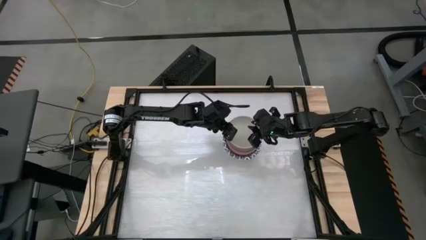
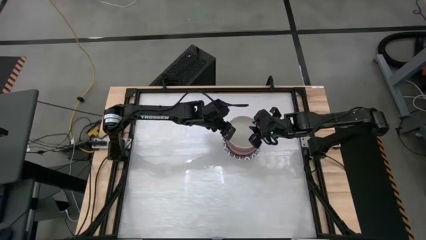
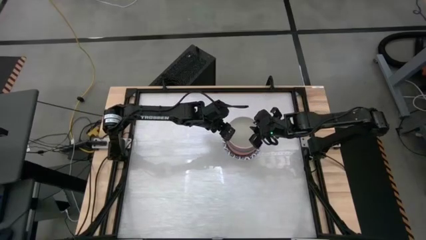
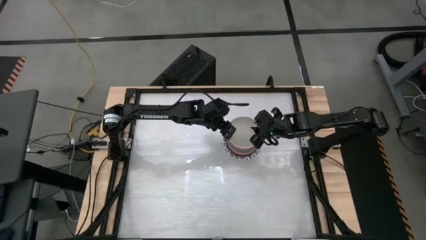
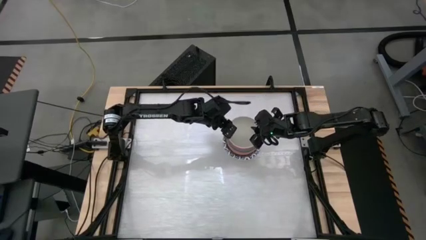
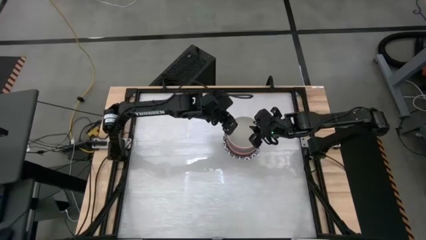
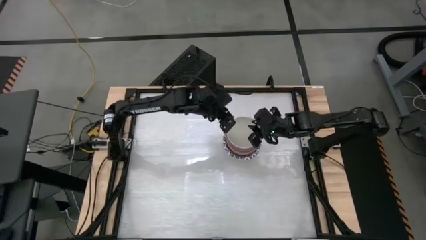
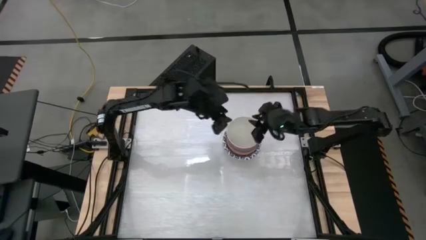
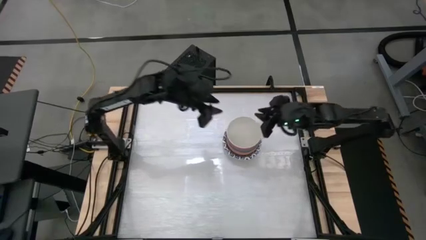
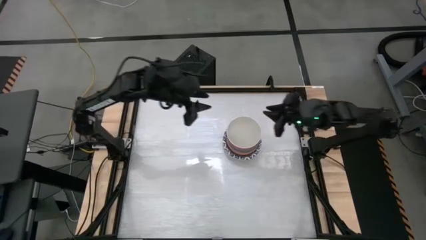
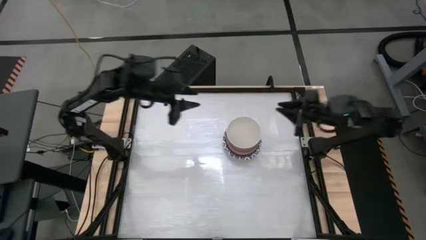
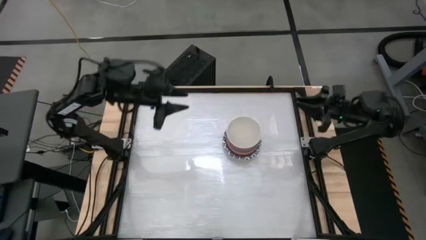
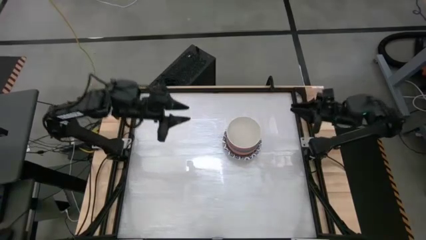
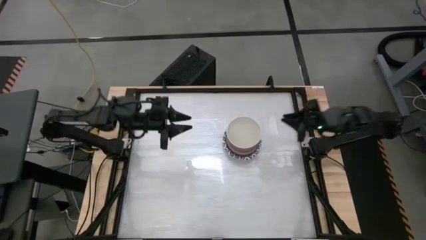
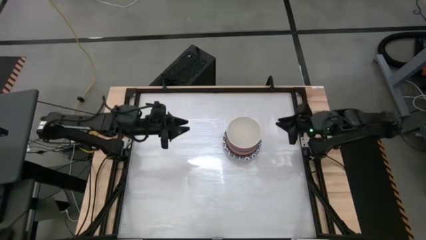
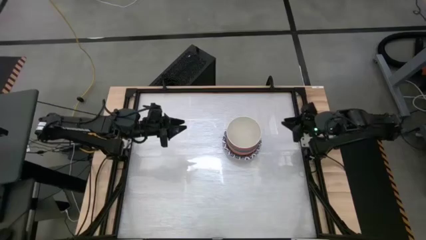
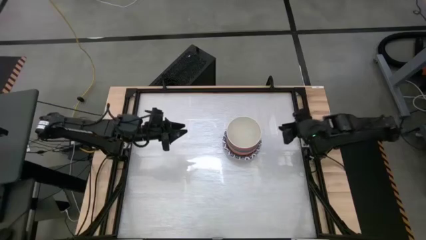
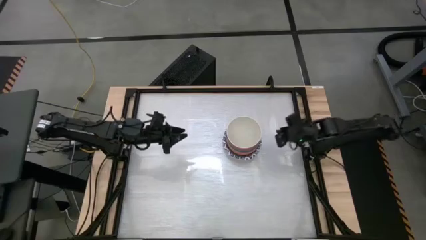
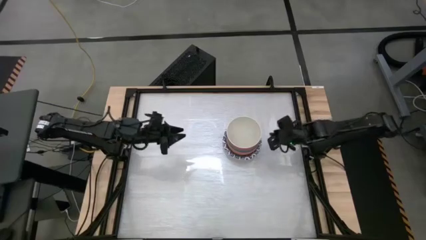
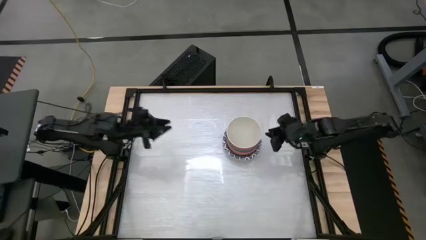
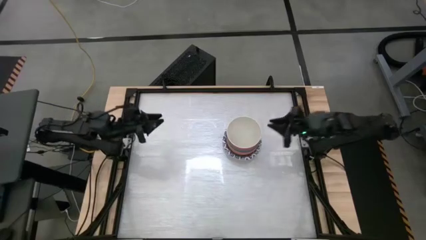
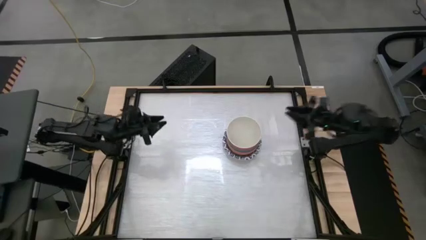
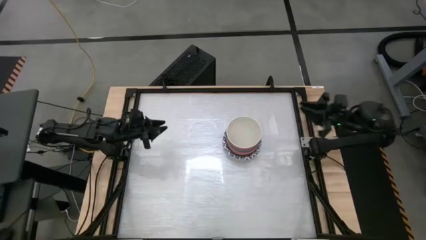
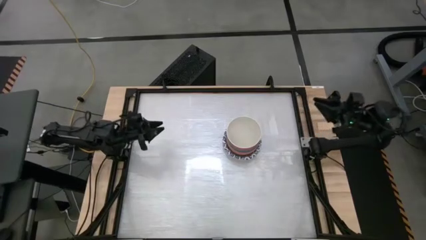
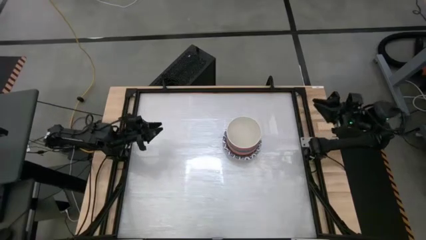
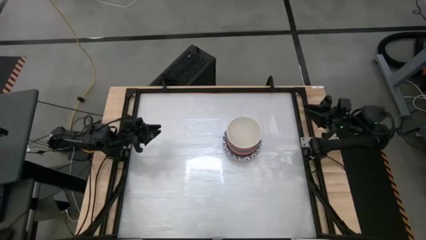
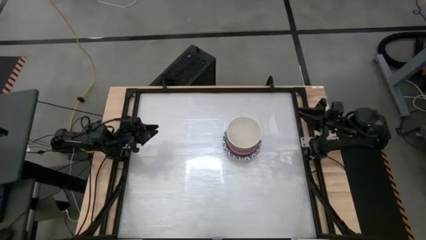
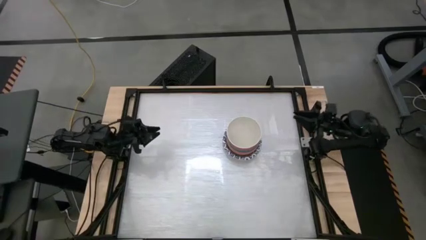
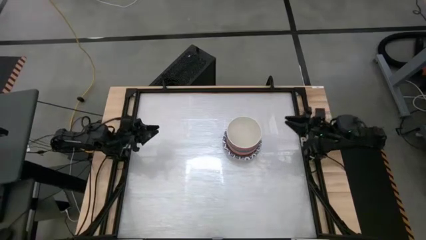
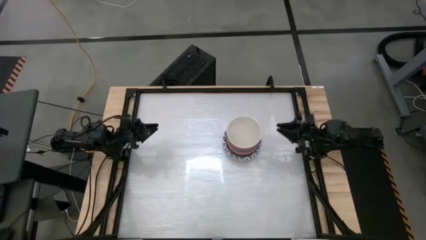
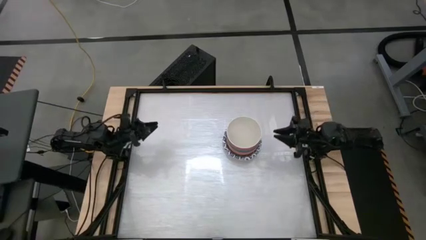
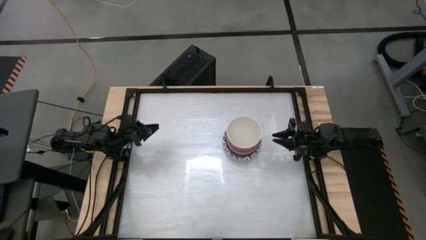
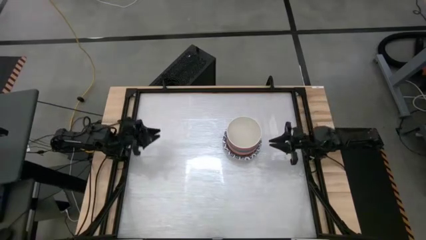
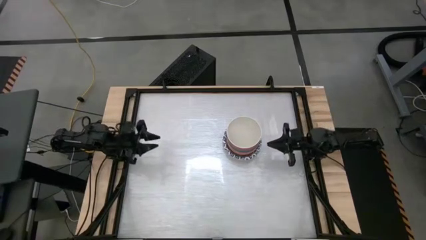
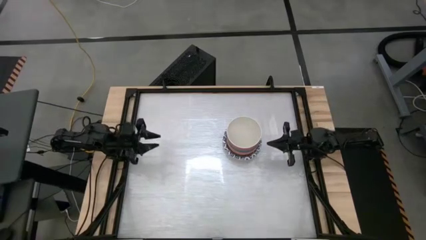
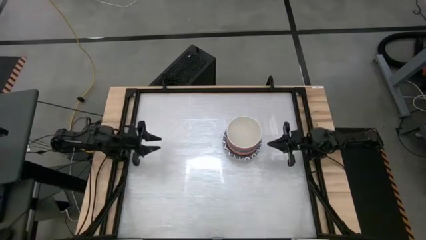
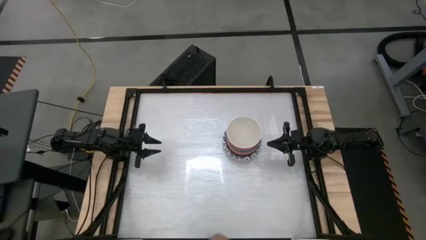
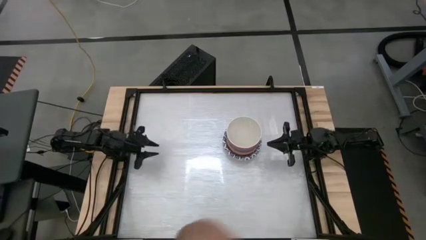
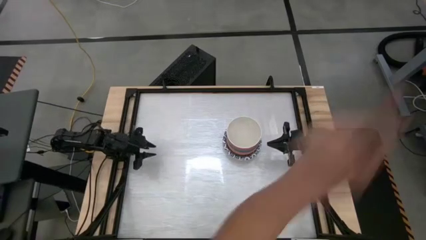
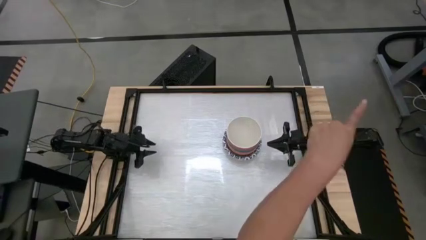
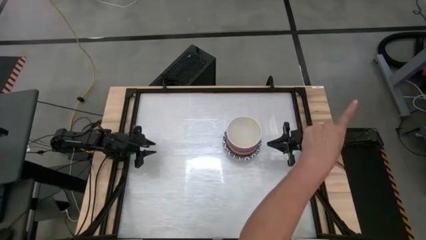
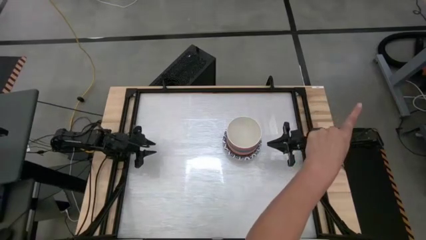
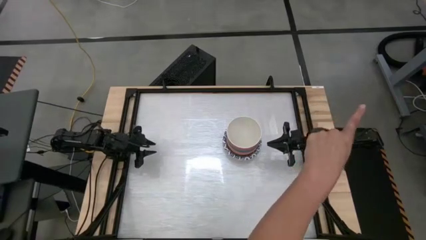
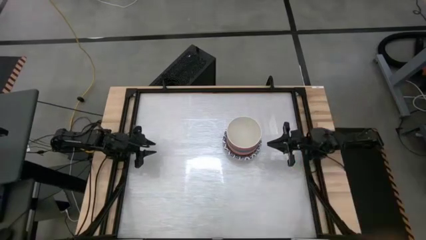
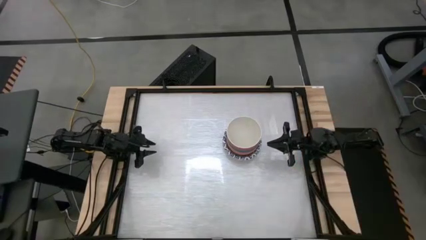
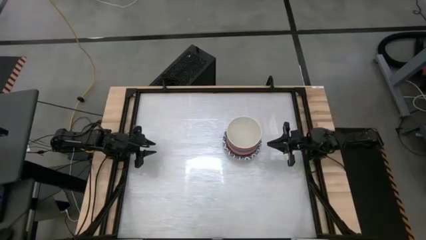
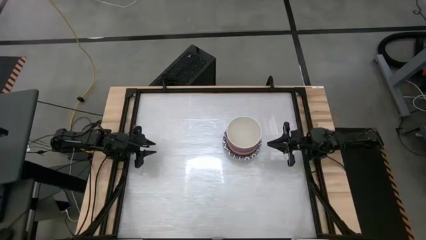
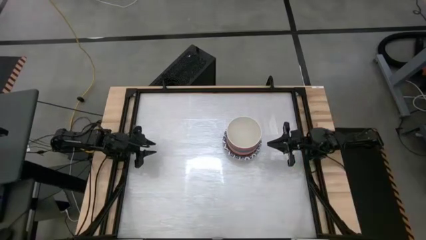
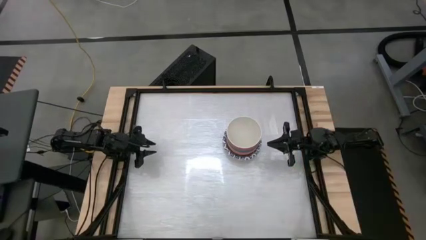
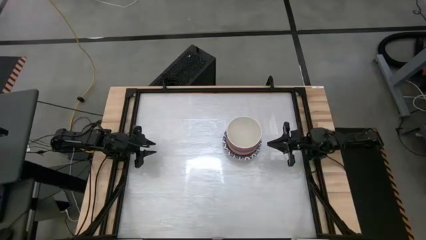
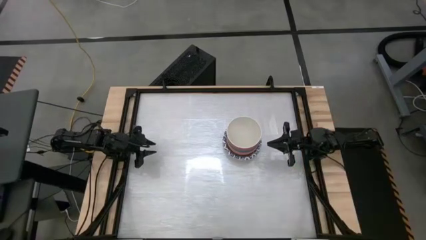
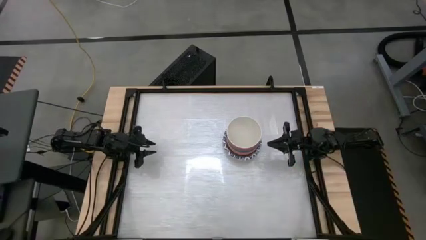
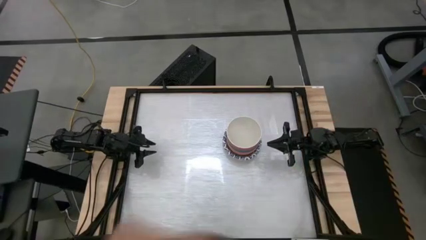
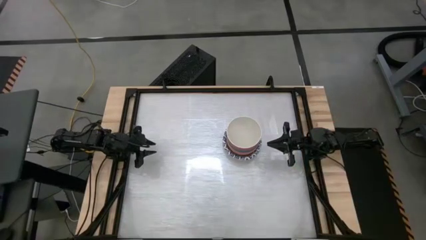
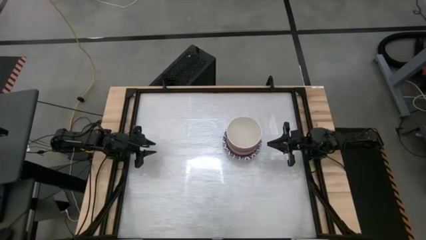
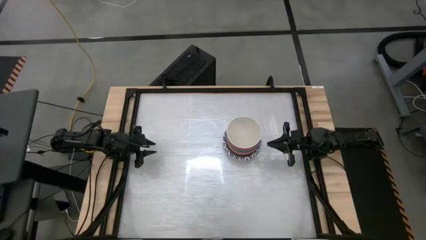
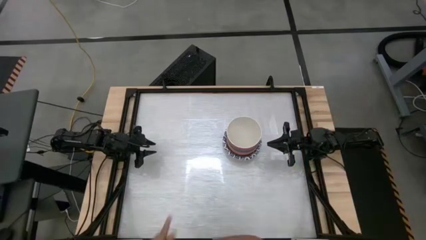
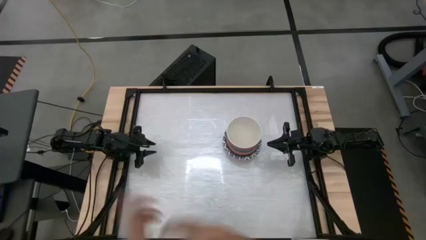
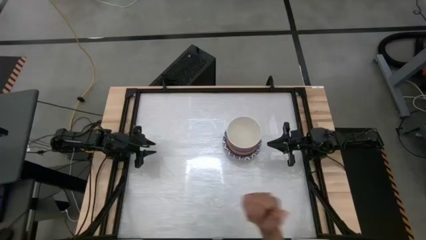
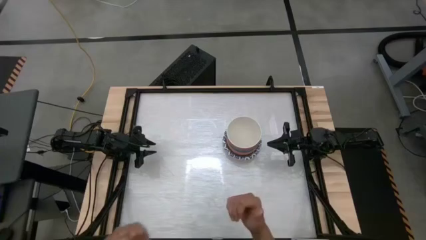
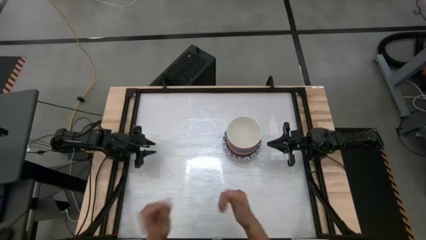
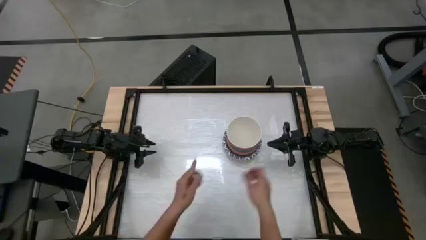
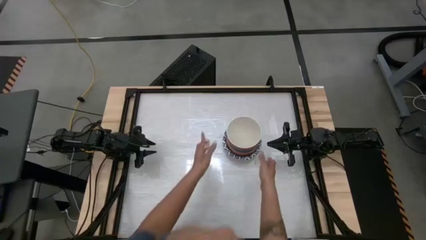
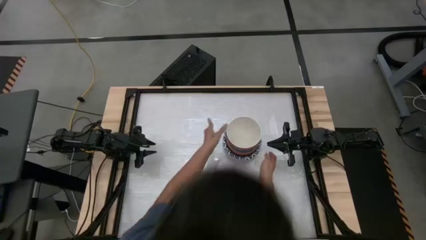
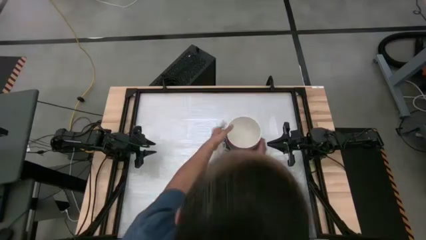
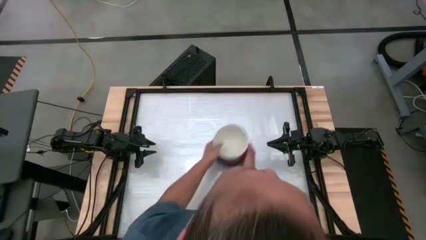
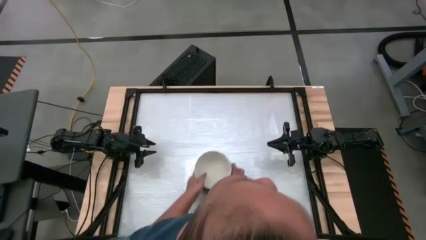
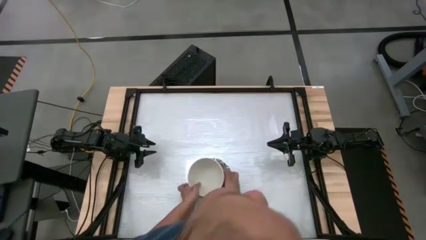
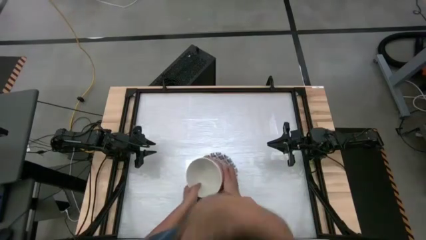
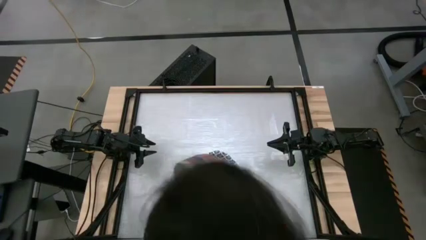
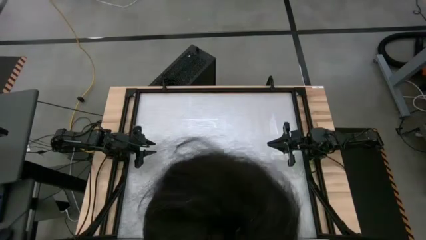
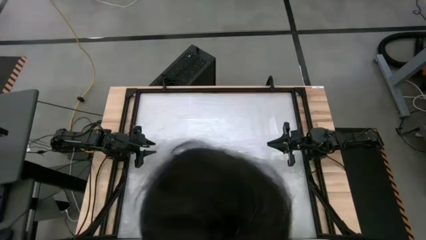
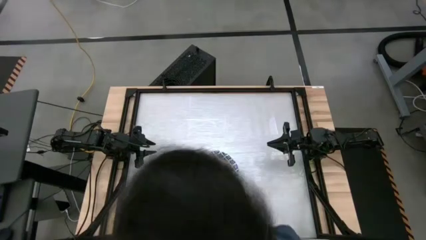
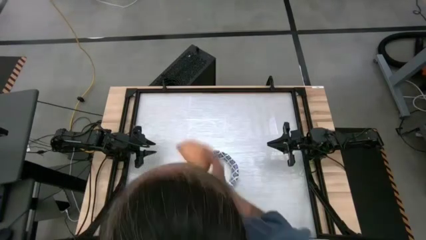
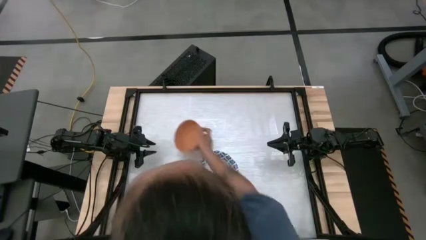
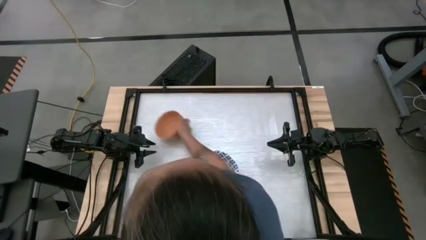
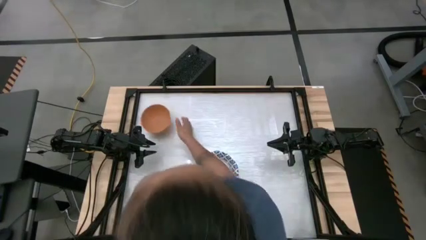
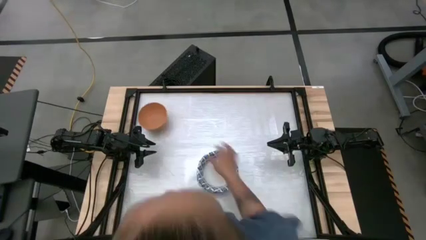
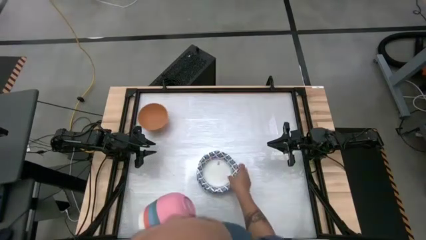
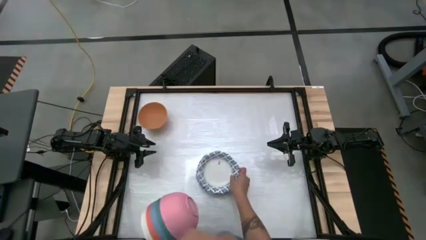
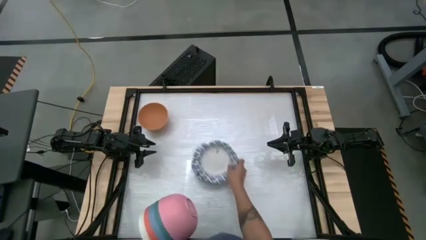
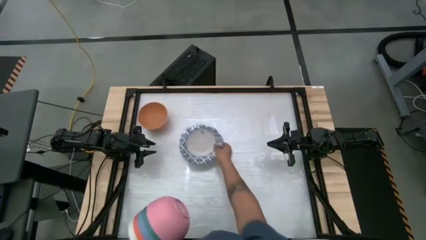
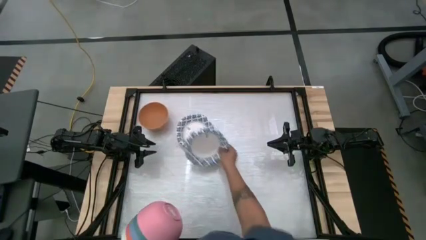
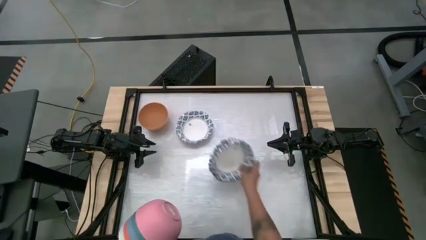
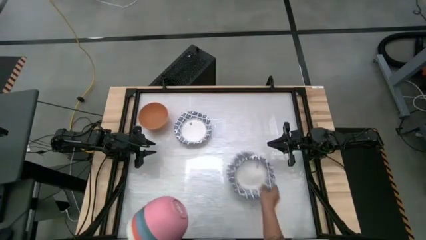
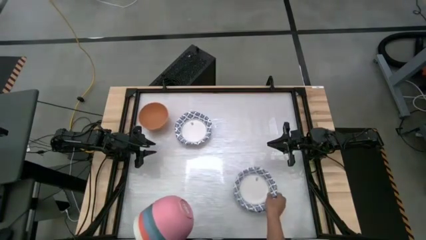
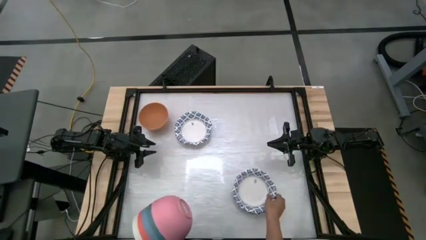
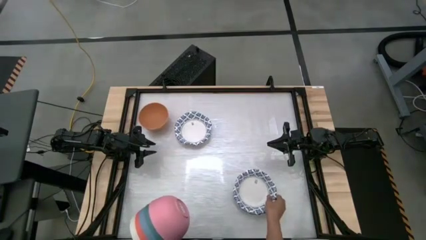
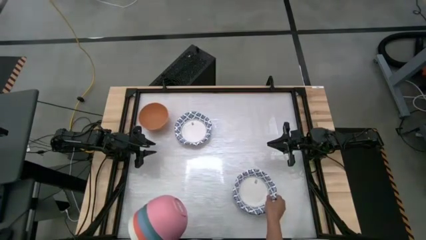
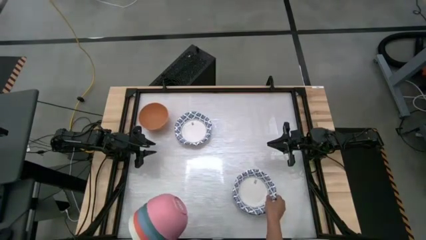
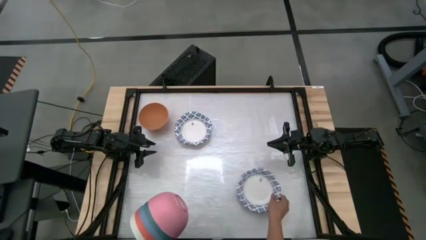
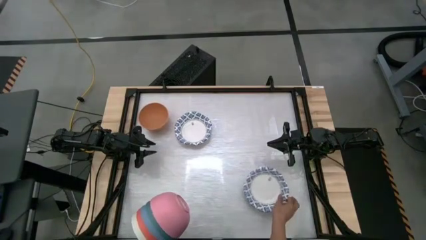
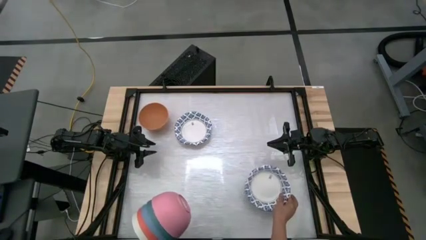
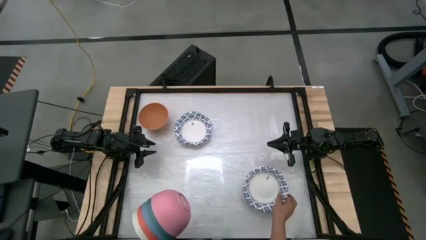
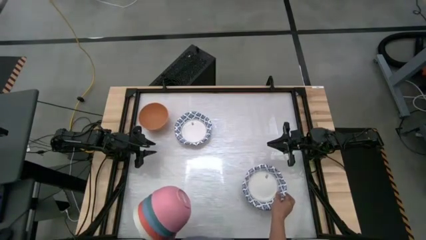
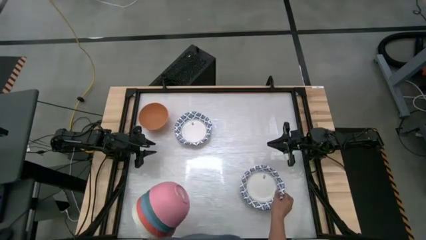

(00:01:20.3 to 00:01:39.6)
Return to Home Position
